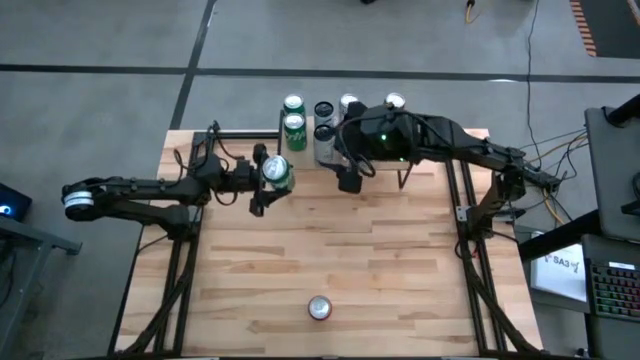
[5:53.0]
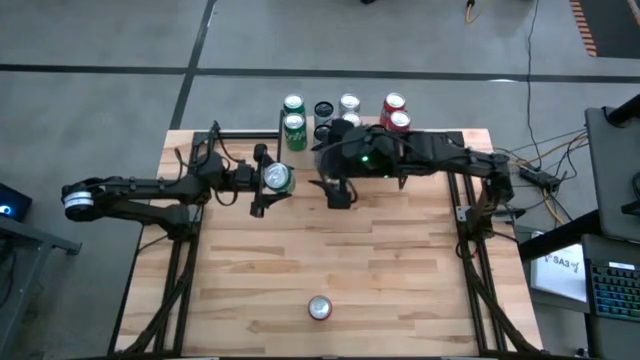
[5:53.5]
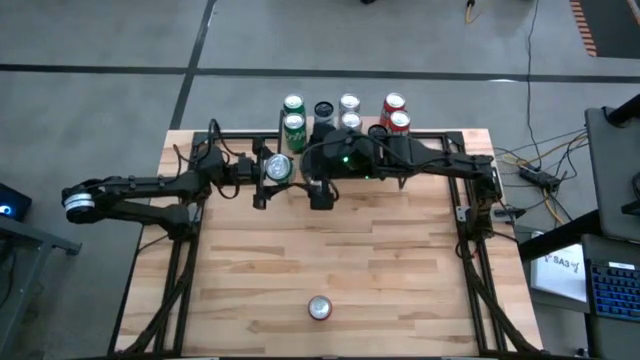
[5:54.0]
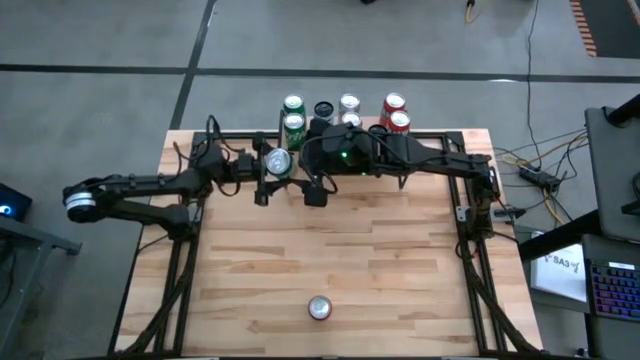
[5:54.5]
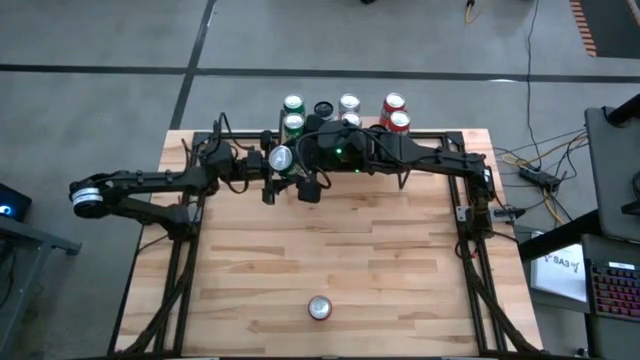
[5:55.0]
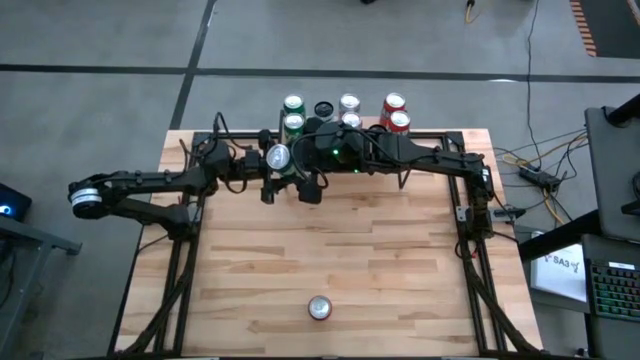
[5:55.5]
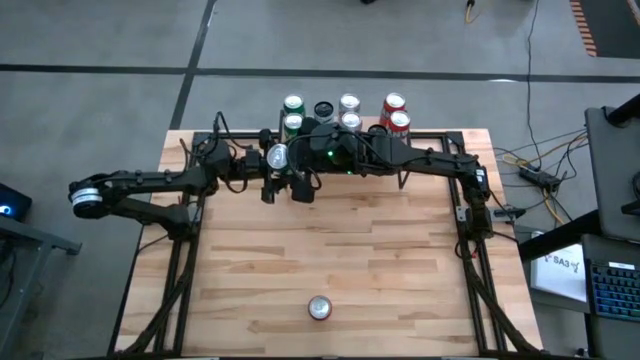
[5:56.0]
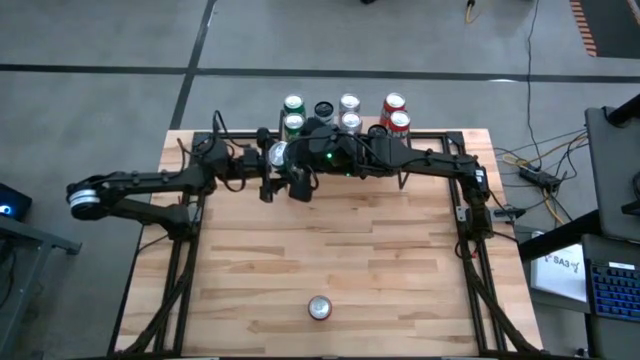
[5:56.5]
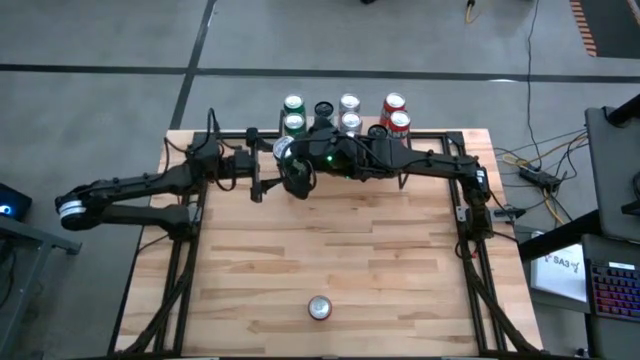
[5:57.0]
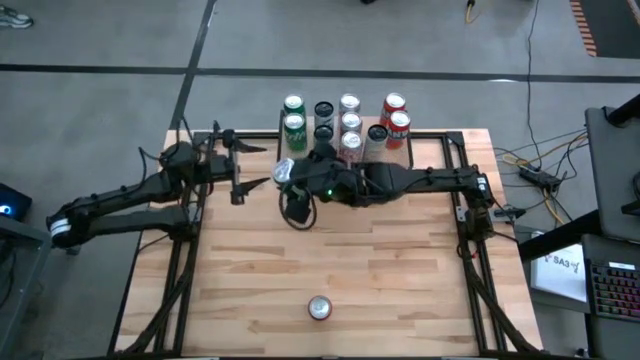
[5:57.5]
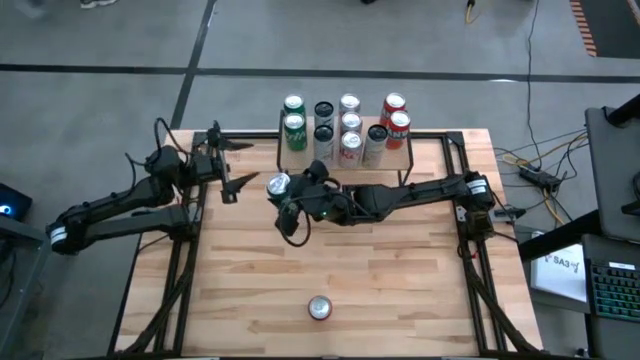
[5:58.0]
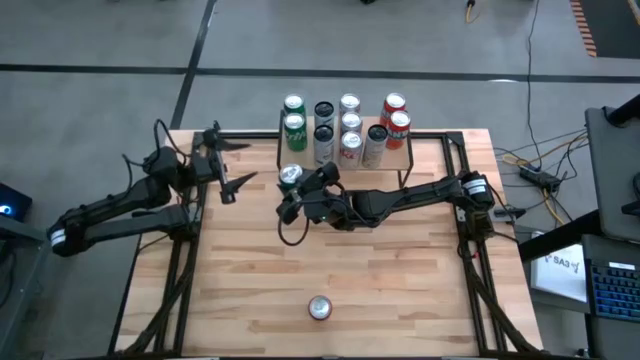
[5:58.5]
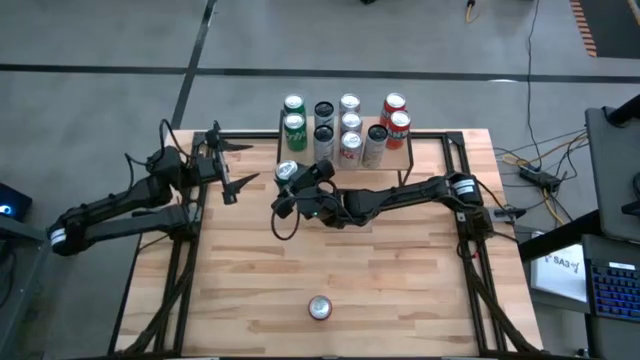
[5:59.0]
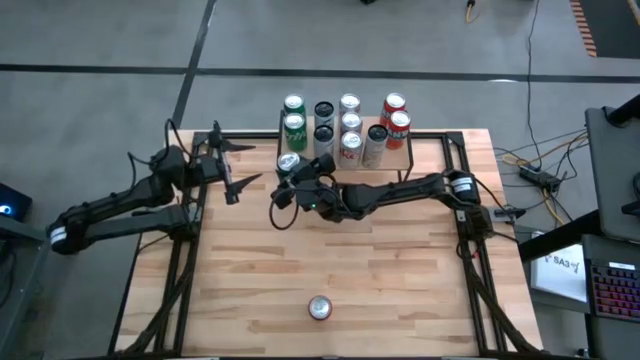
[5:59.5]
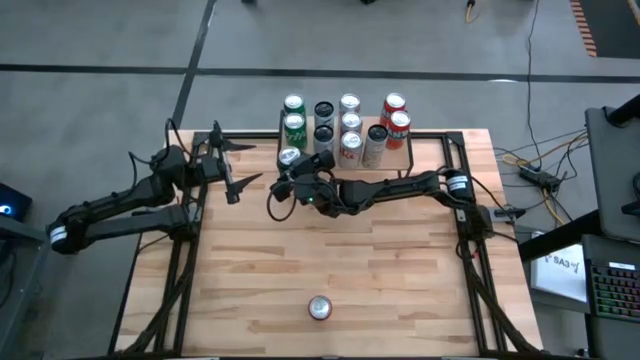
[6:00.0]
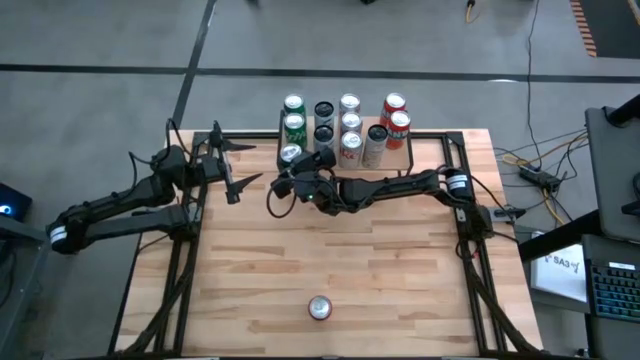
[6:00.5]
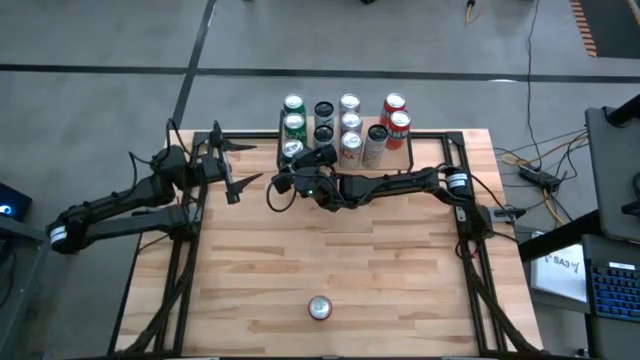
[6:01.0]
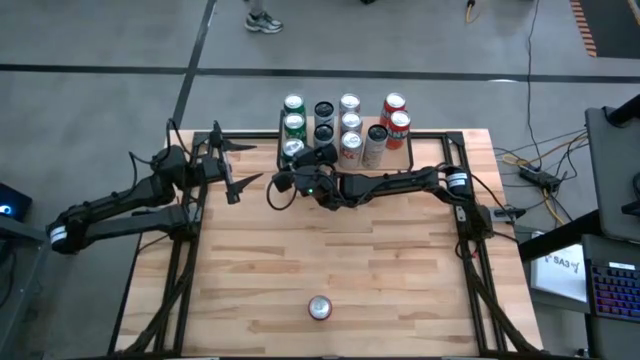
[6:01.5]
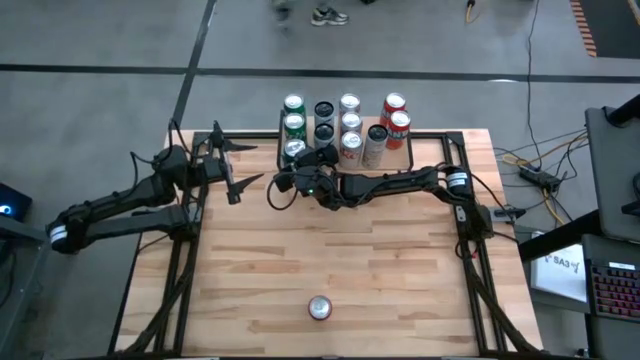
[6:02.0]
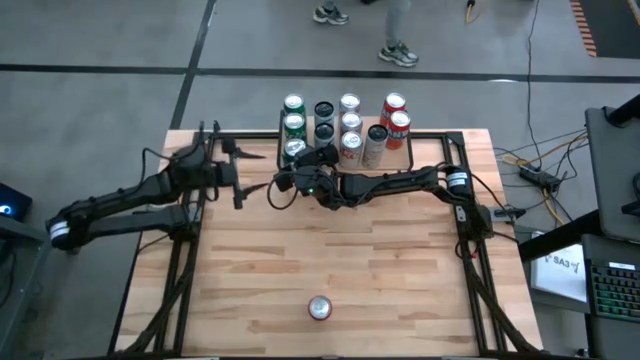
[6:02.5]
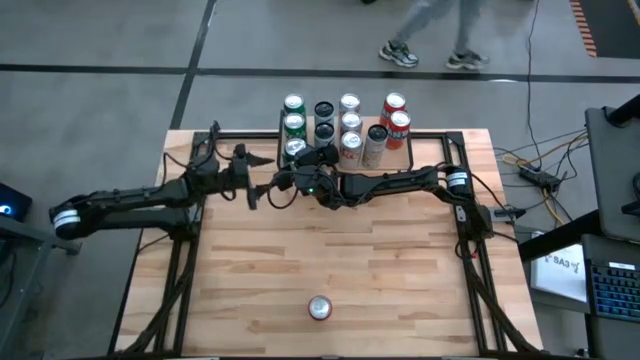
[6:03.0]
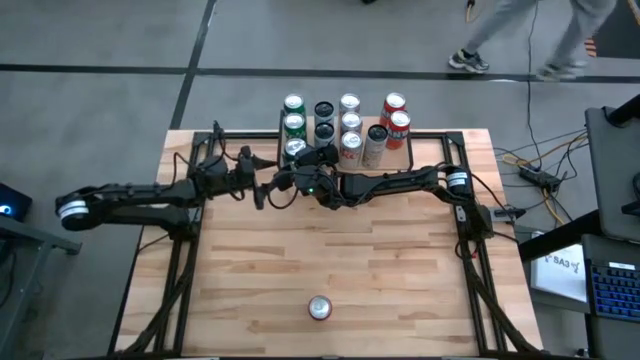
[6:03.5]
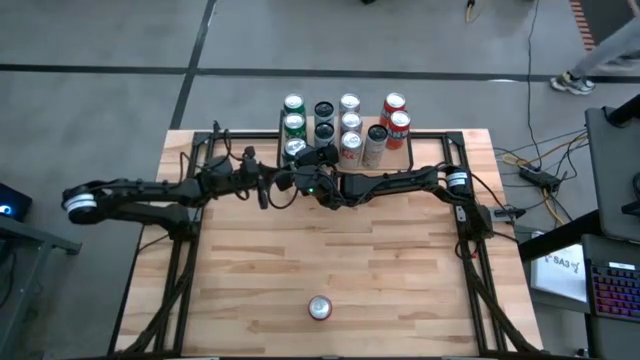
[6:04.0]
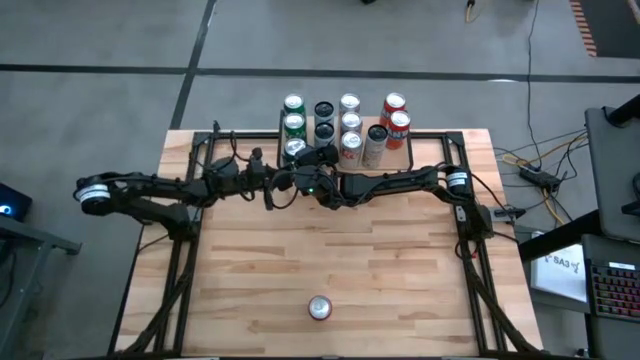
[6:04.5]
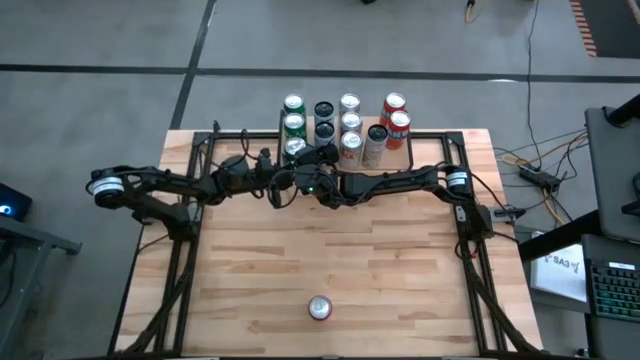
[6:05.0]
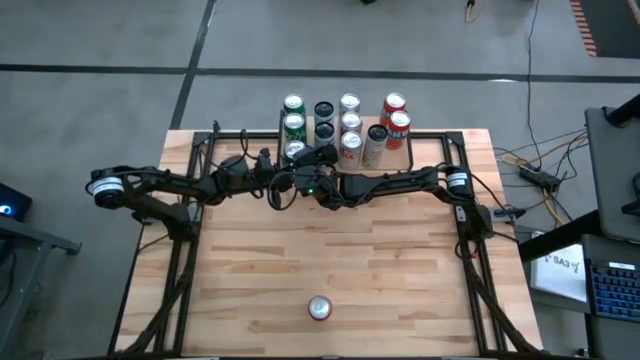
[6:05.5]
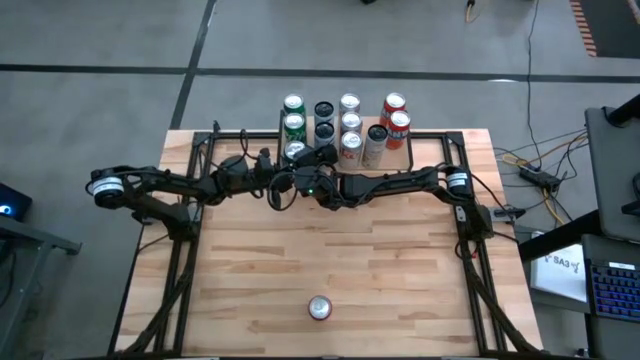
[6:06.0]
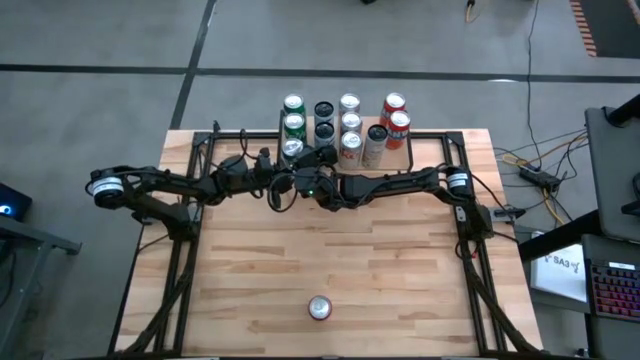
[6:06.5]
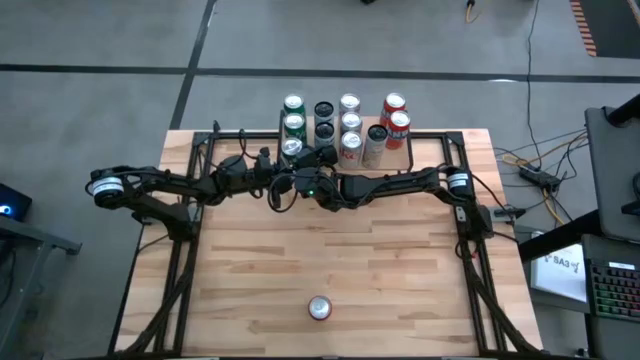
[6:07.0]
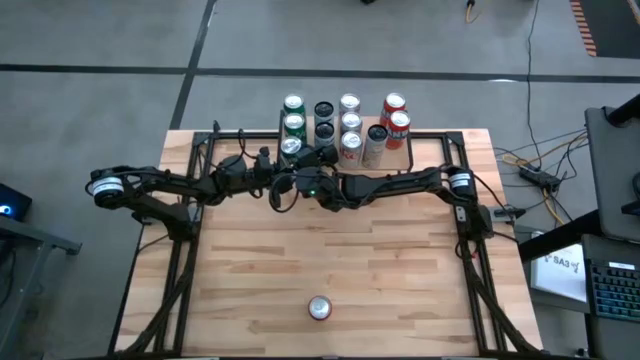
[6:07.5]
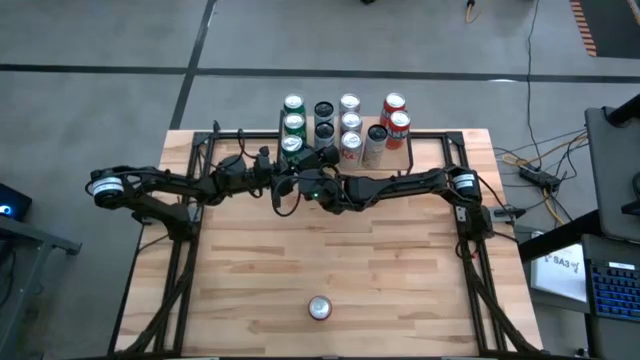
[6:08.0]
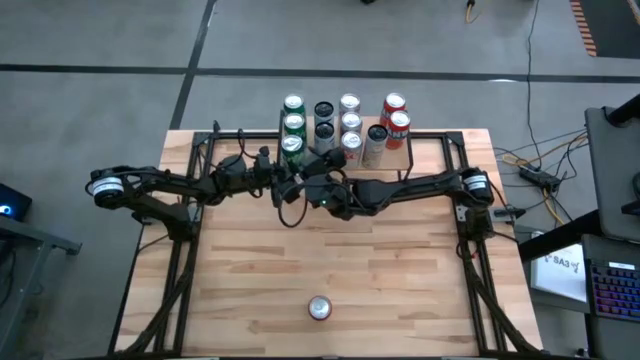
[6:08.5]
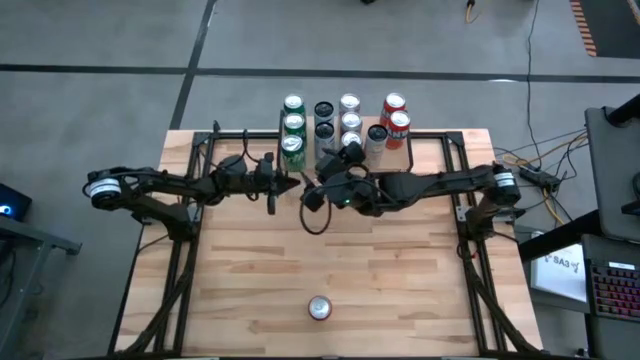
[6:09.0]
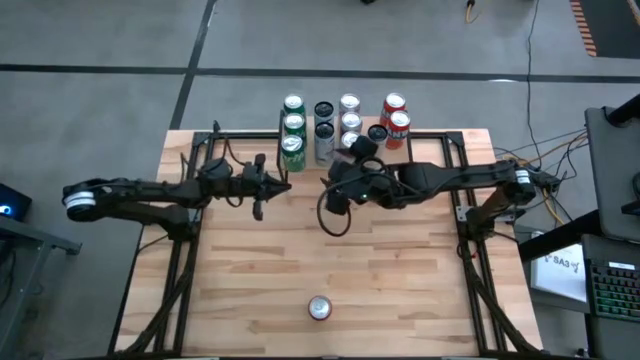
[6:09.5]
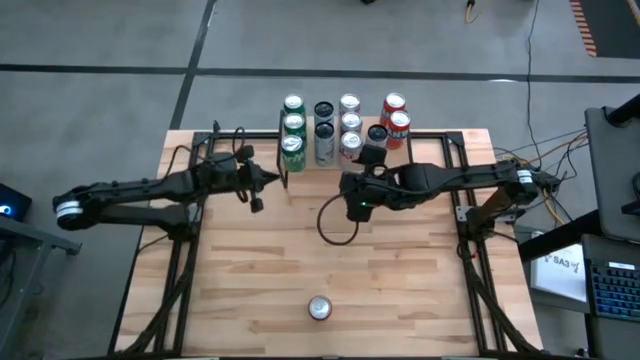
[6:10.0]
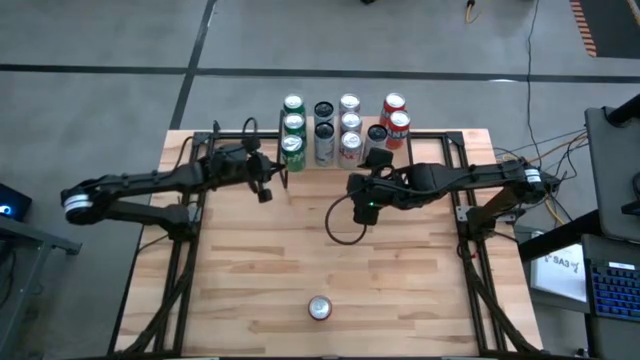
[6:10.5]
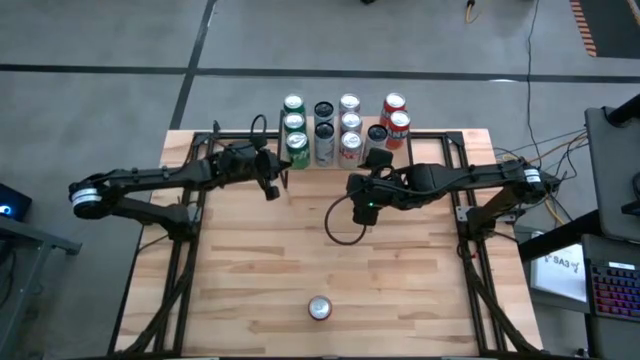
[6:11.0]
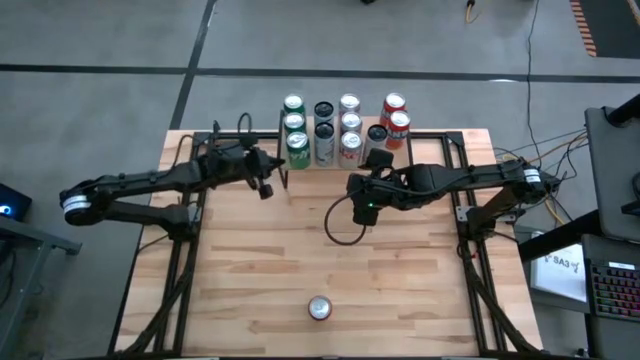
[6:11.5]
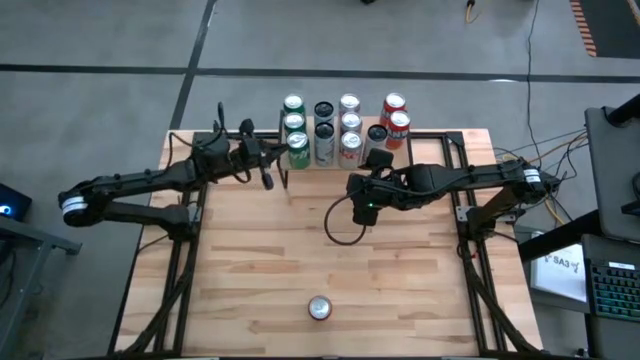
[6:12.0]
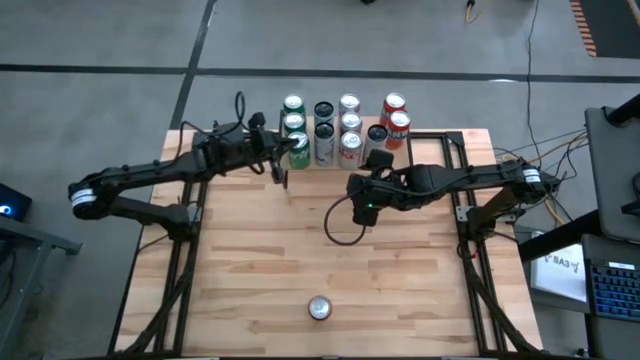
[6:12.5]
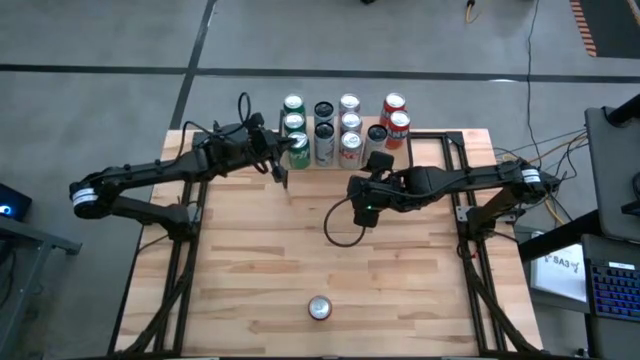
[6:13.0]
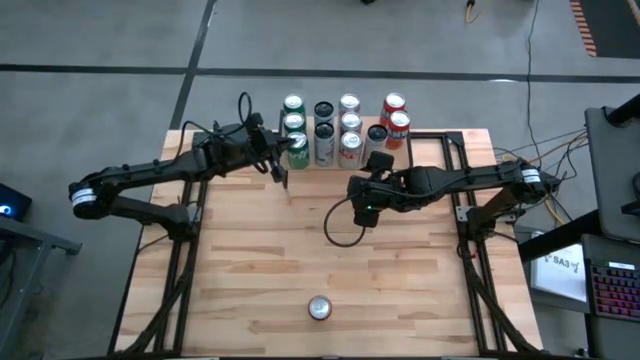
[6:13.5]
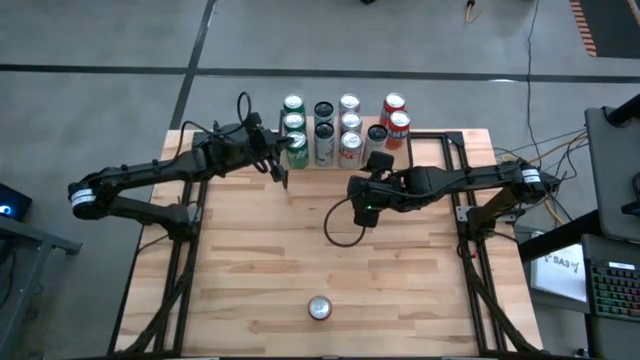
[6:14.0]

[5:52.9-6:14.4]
Task: Place canned beverage on shelf
Put the green soda can on the shelf aligned with the other green soda cans
